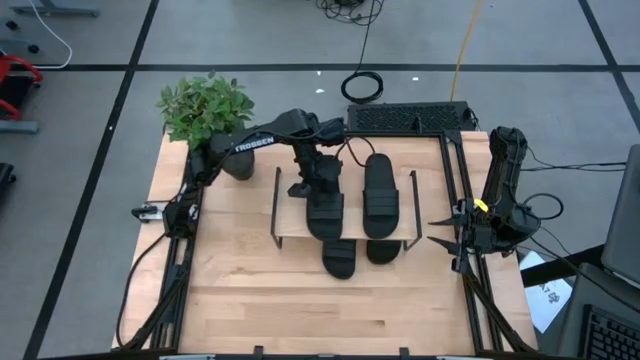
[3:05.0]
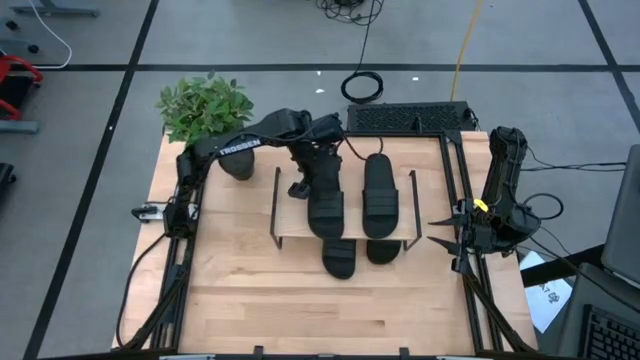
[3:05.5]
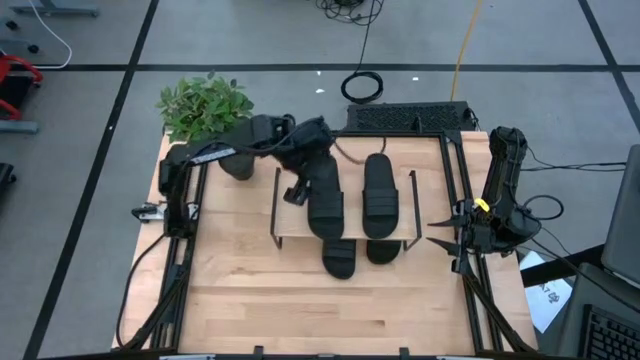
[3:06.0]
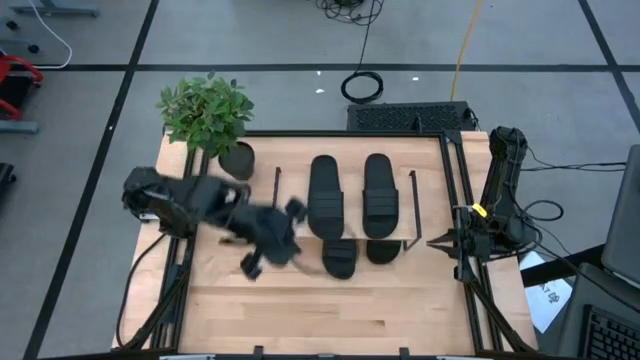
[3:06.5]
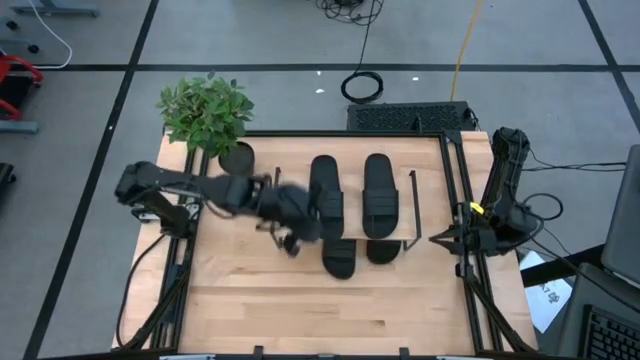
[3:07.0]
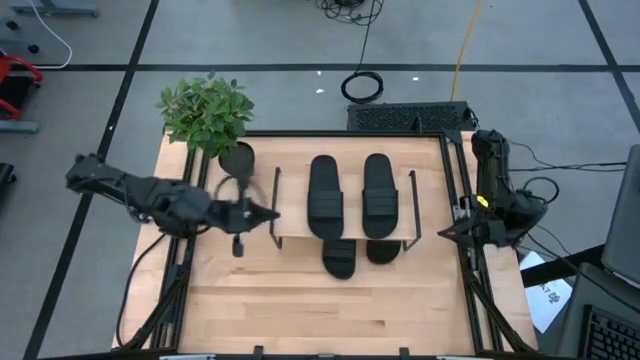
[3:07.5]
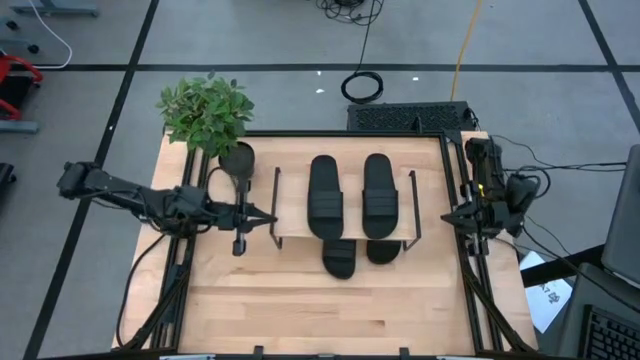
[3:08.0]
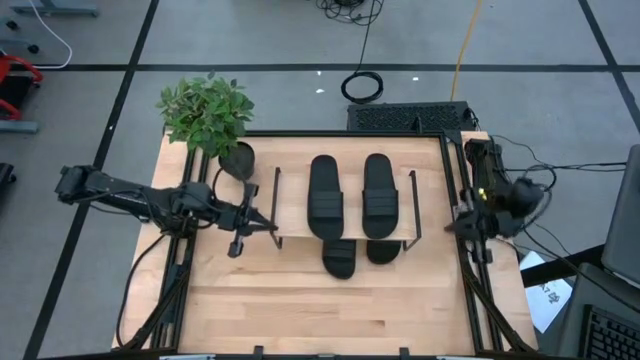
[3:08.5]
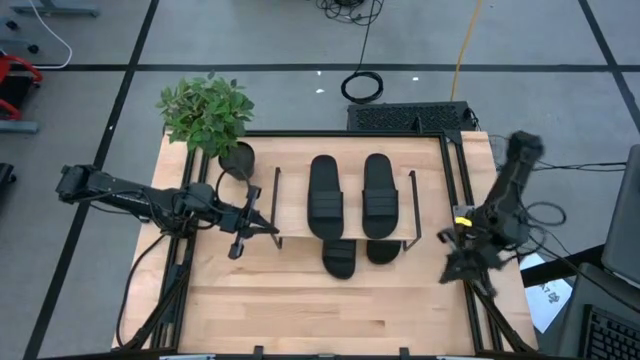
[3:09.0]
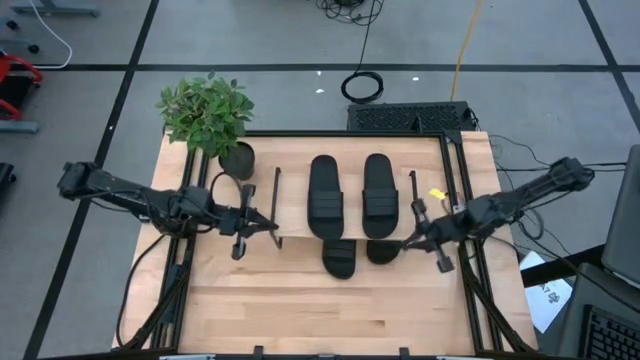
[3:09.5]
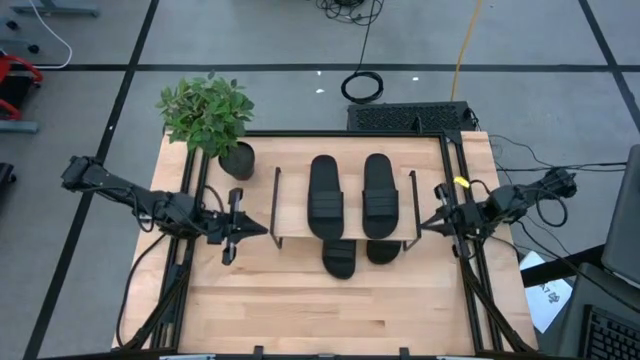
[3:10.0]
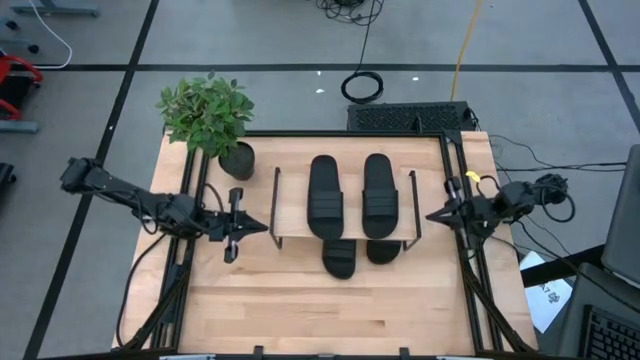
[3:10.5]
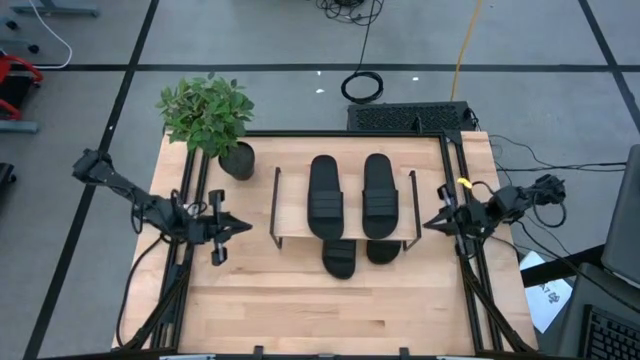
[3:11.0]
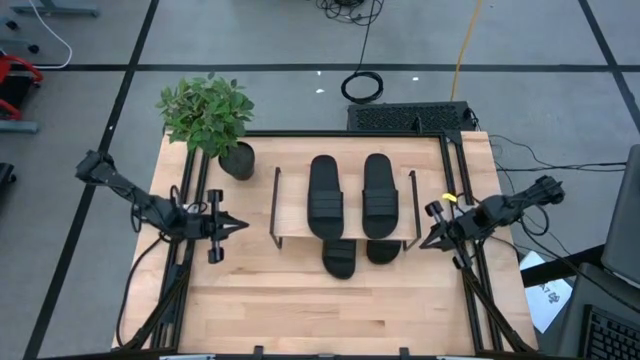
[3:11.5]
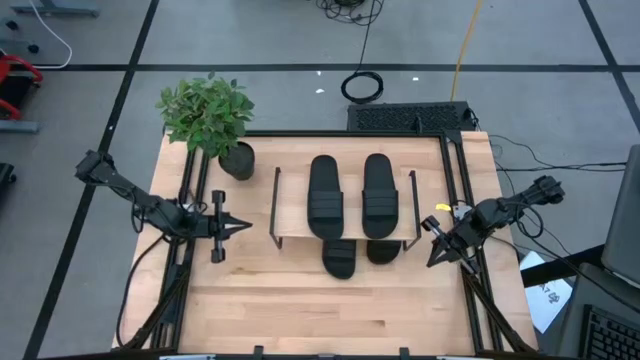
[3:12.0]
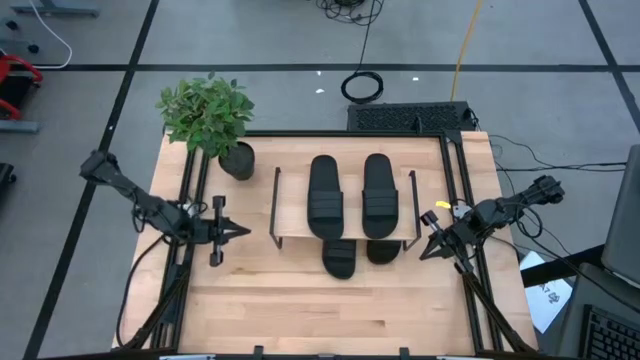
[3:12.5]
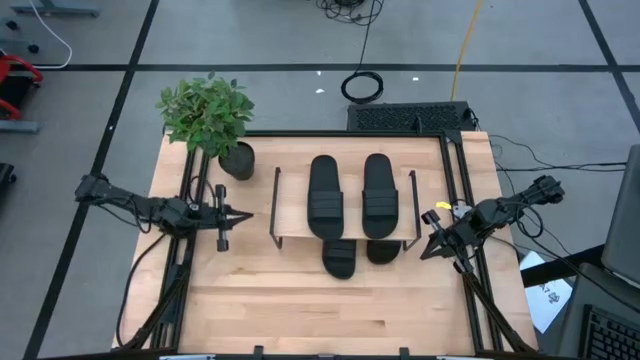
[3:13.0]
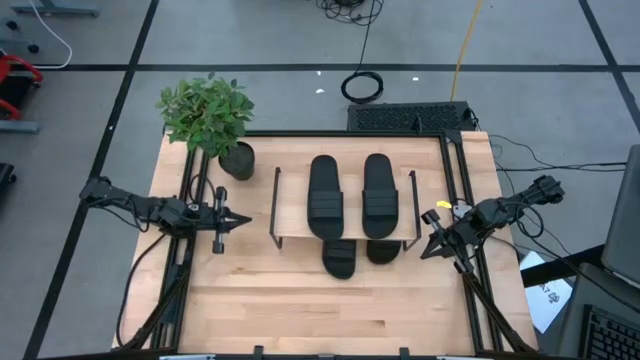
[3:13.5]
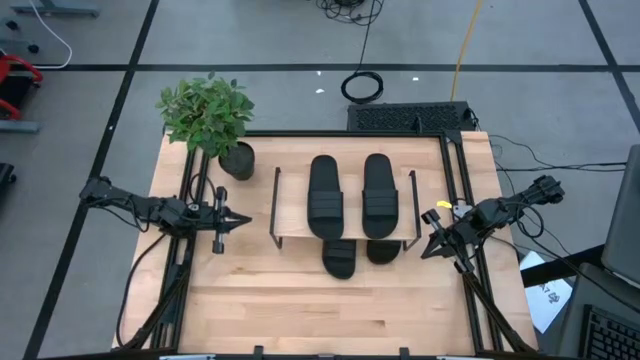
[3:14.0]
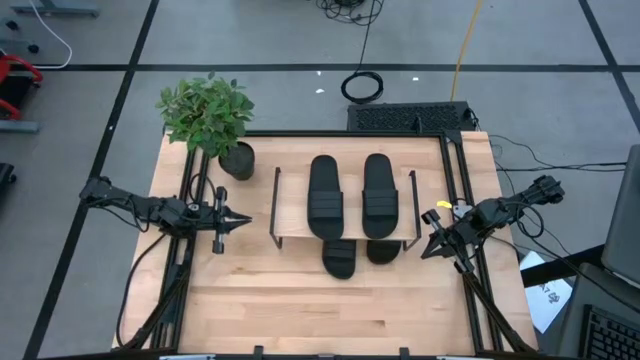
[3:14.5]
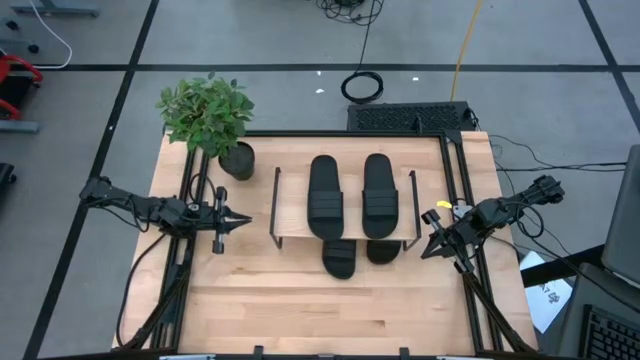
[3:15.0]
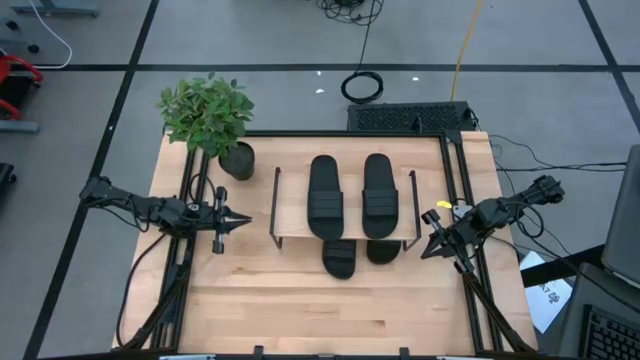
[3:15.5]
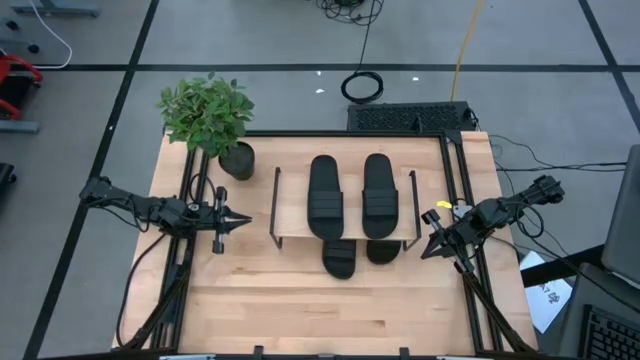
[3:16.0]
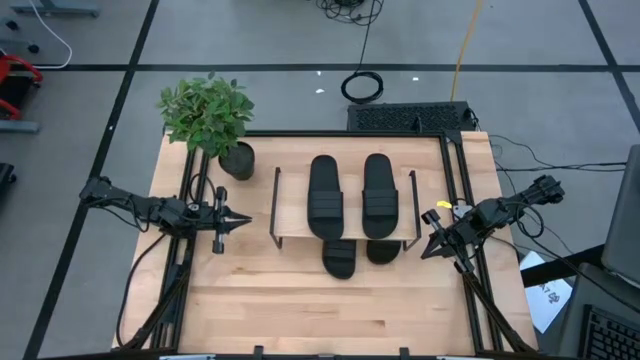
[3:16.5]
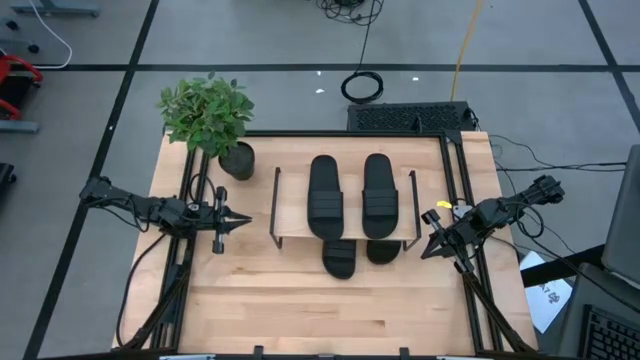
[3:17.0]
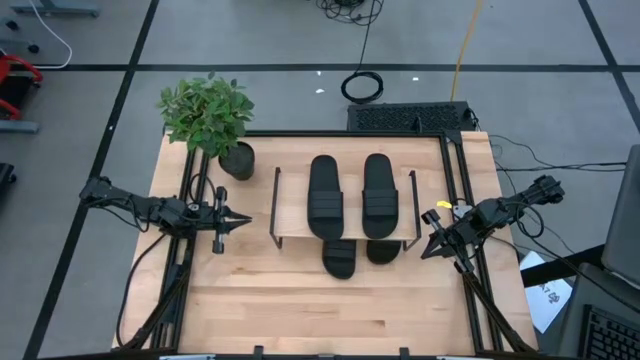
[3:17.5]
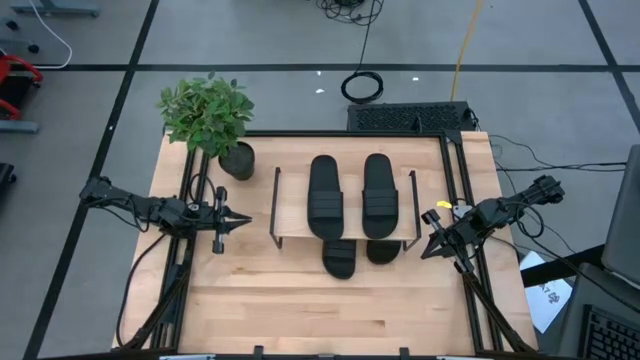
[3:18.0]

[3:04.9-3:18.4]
Task: Pick and place slides into the shelf
Return to Home Position

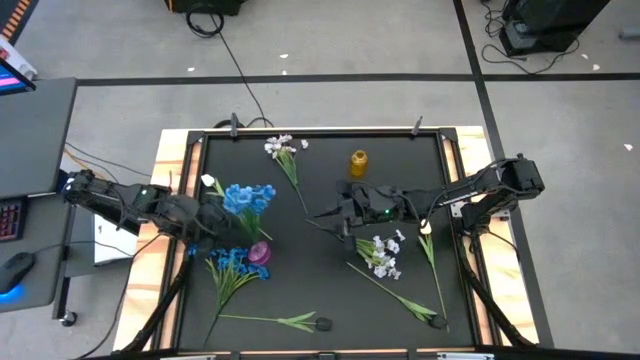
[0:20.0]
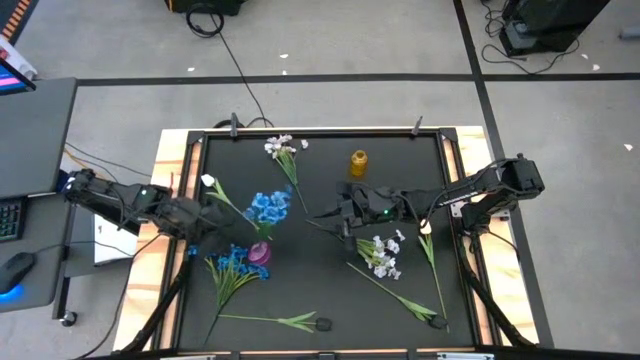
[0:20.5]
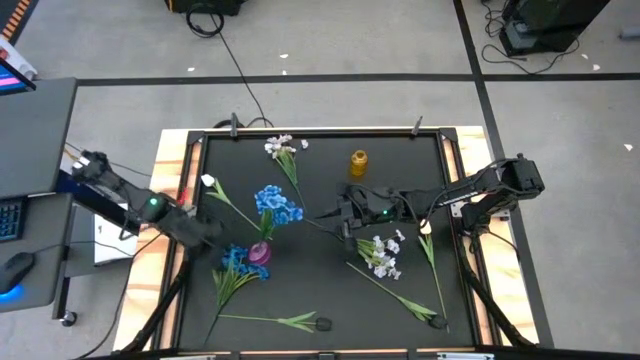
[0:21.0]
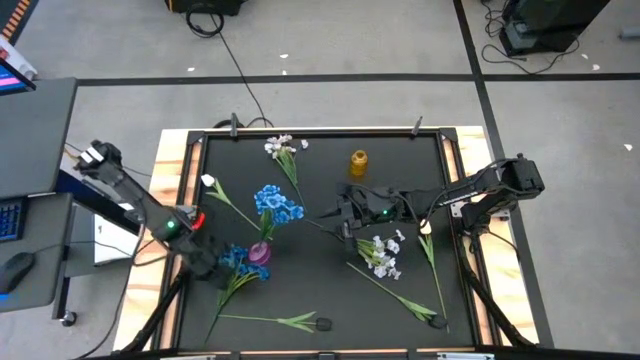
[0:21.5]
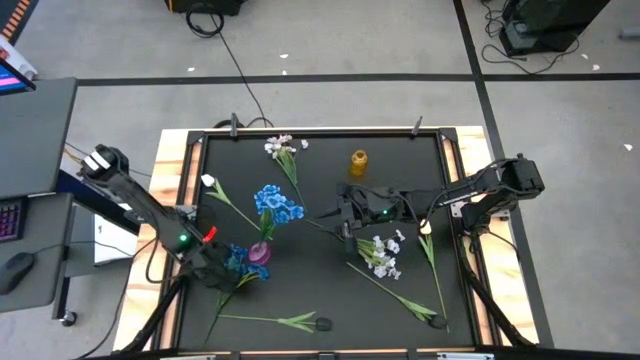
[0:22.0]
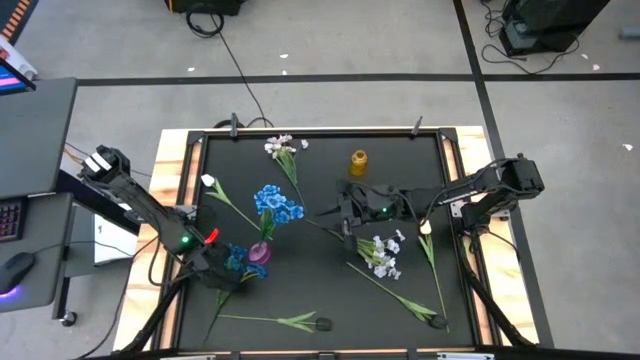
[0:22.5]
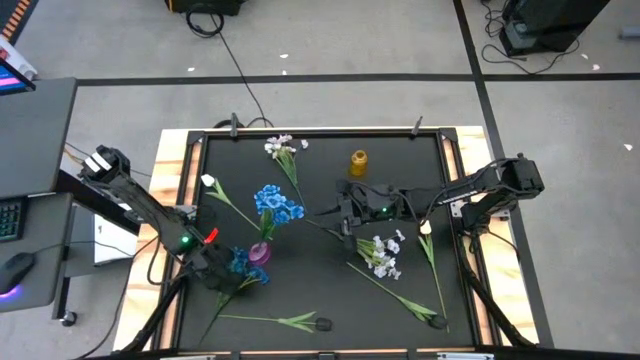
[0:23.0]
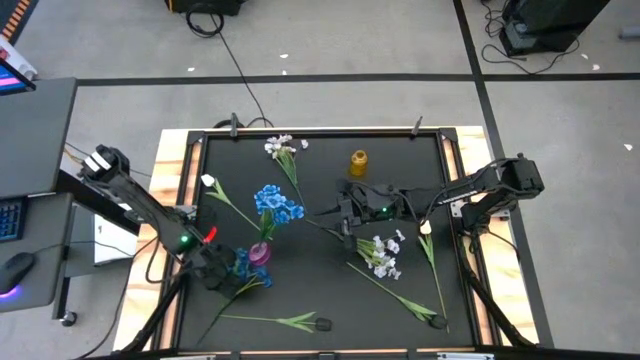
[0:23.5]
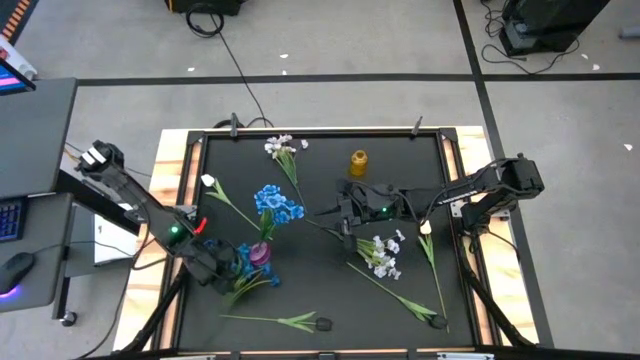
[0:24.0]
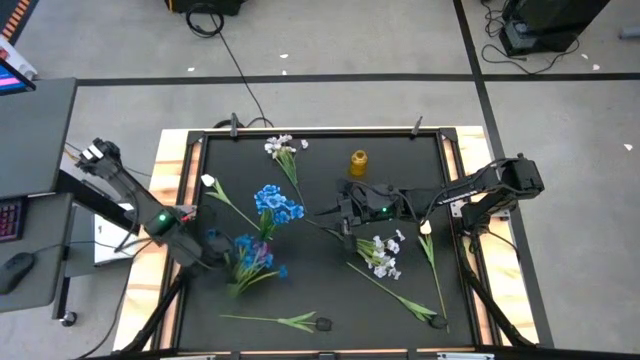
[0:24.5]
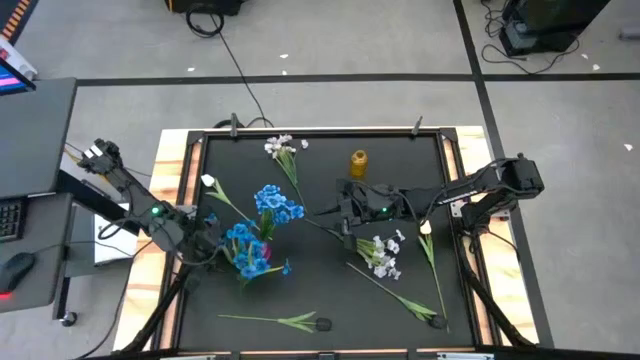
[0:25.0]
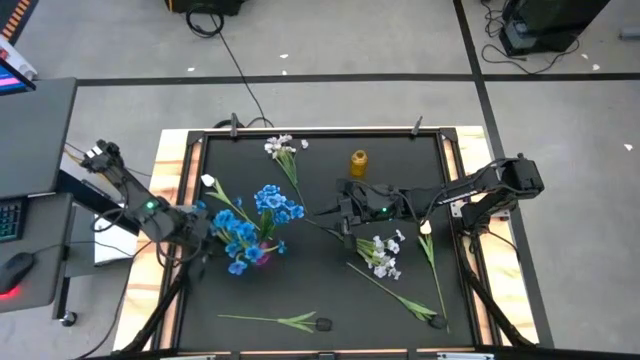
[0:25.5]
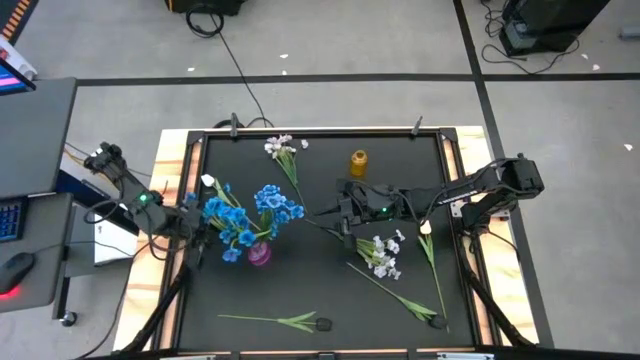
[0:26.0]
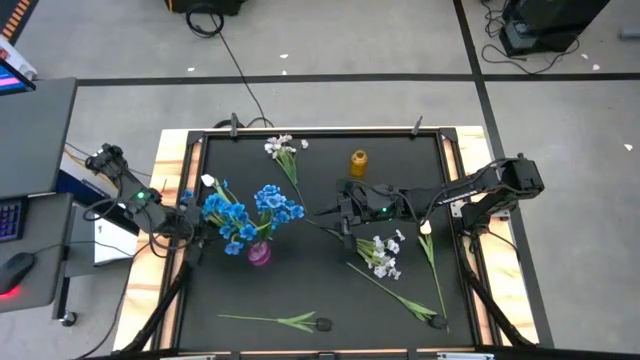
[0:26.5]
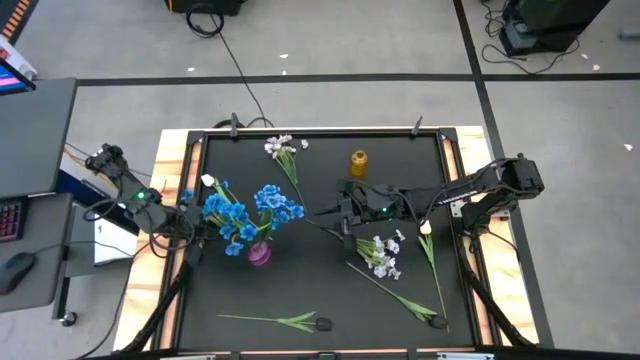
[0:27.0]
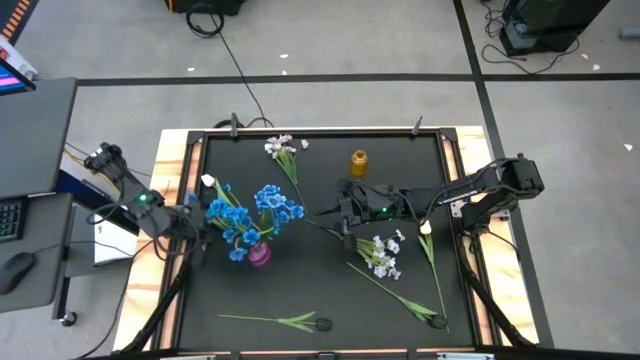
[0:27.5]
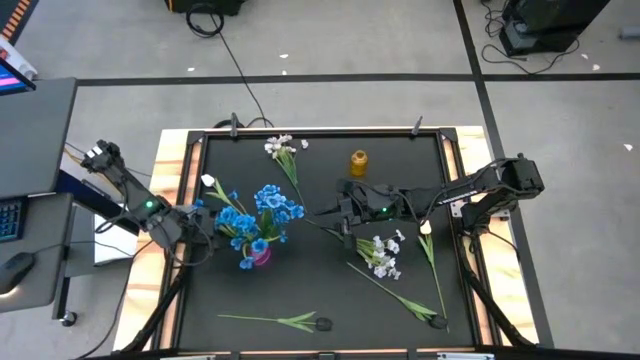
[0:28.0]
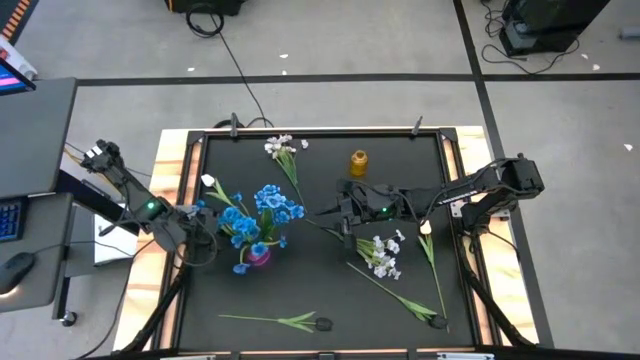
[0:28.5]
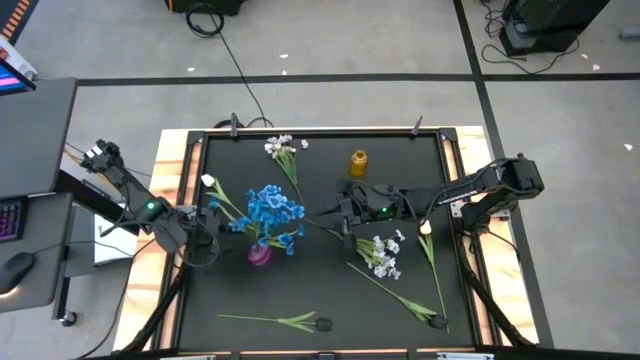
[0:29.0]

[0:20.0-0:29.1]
Task: Sort flowers into vase by color
Put the blue flowers into the violet vase
